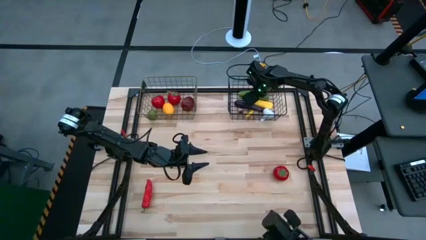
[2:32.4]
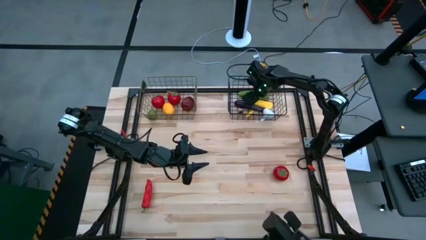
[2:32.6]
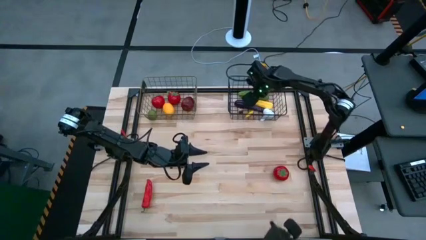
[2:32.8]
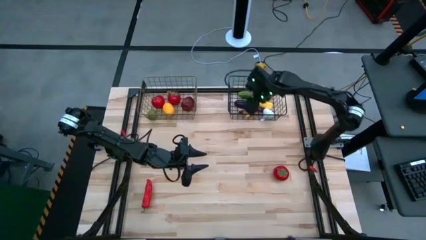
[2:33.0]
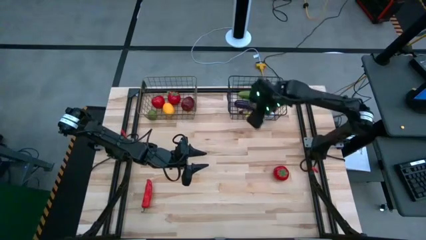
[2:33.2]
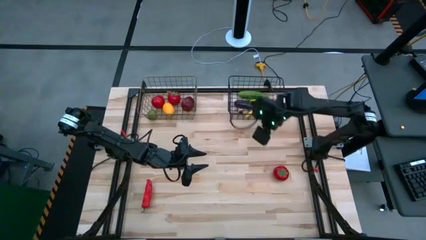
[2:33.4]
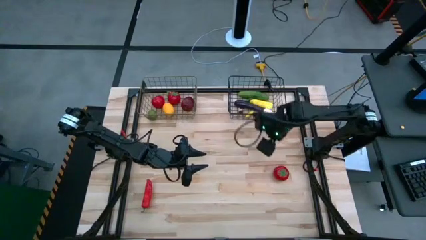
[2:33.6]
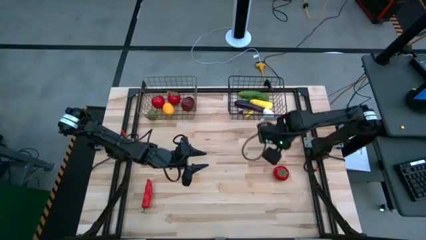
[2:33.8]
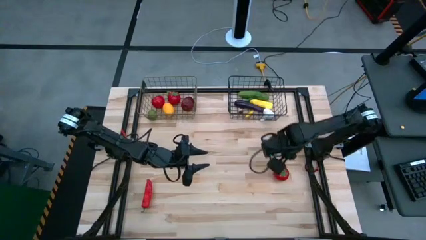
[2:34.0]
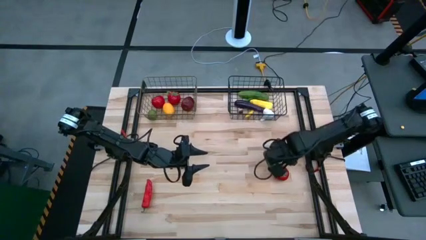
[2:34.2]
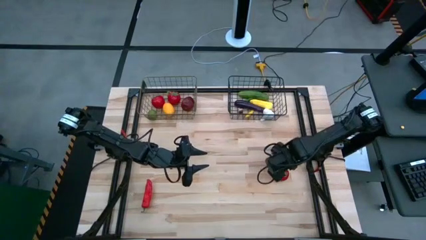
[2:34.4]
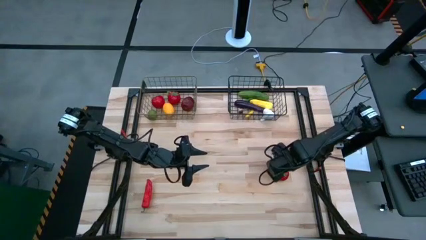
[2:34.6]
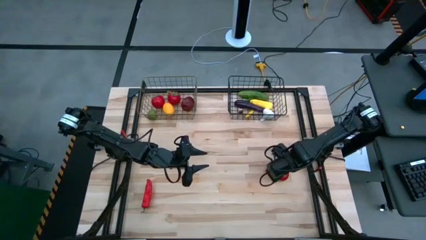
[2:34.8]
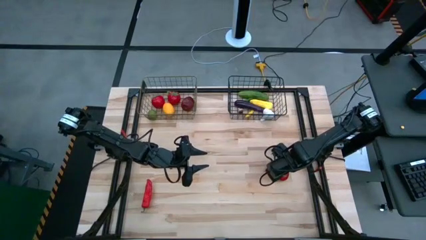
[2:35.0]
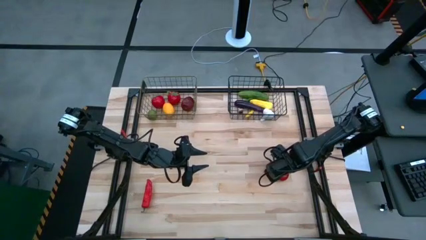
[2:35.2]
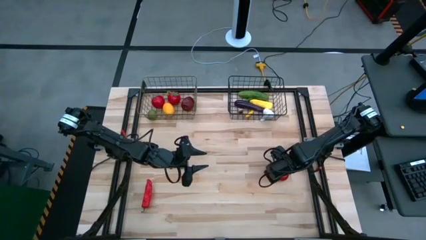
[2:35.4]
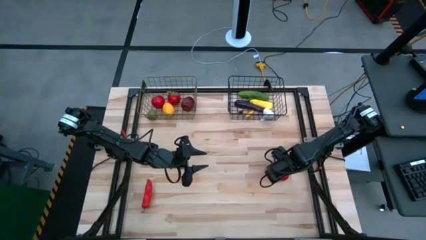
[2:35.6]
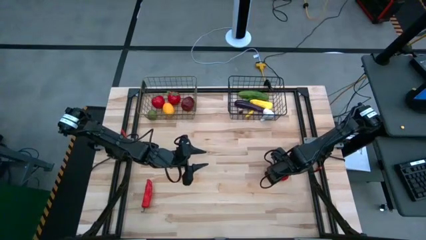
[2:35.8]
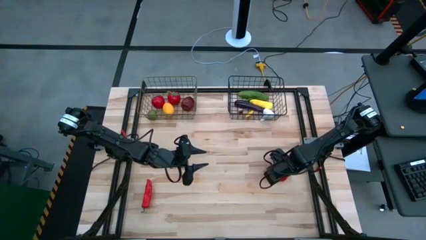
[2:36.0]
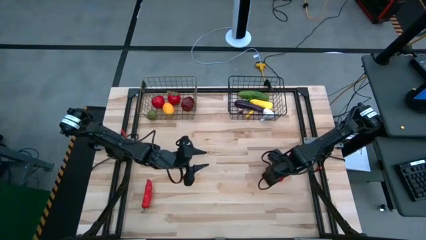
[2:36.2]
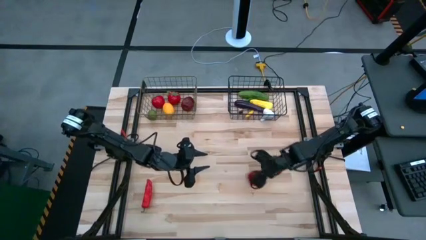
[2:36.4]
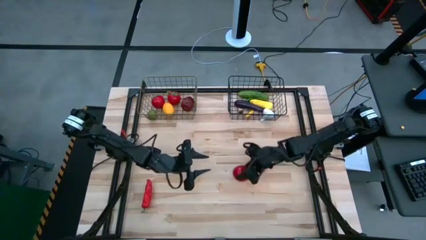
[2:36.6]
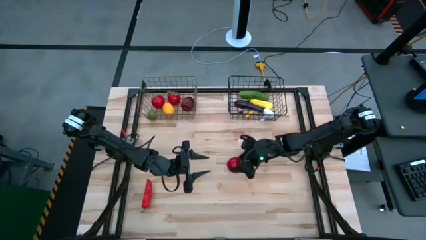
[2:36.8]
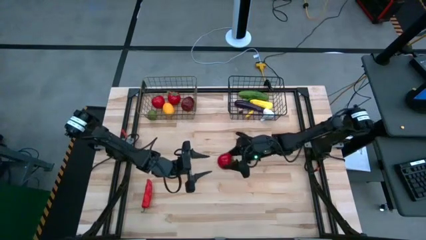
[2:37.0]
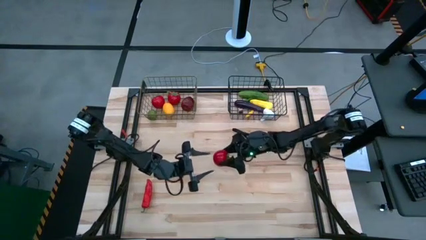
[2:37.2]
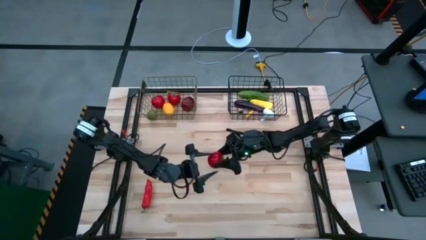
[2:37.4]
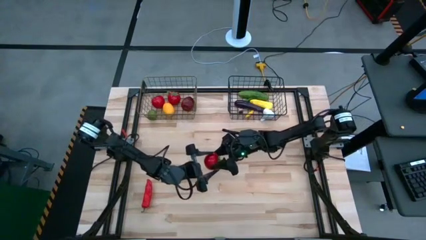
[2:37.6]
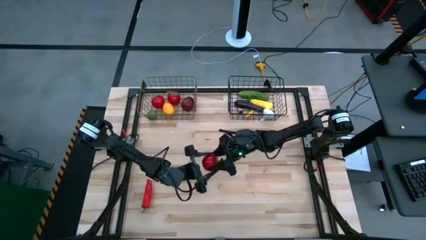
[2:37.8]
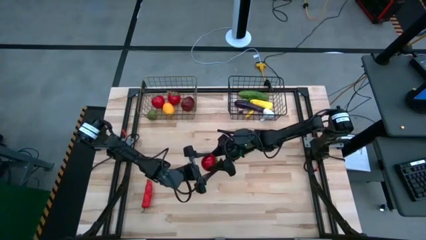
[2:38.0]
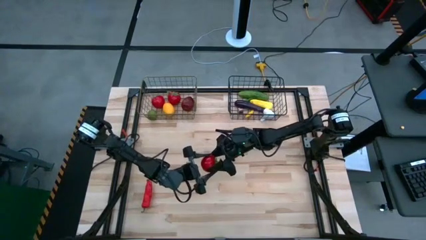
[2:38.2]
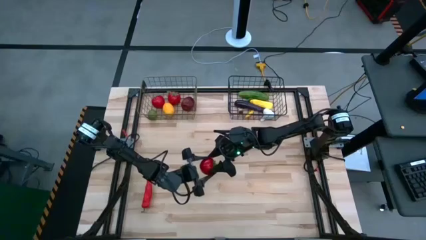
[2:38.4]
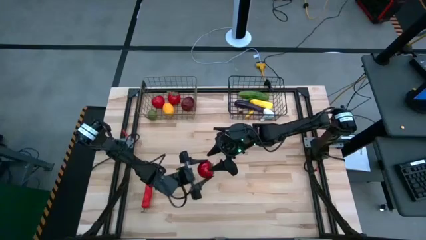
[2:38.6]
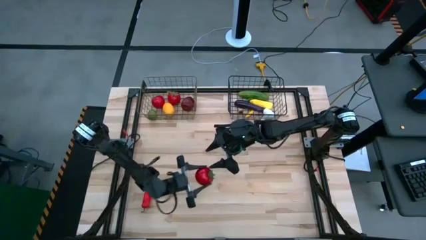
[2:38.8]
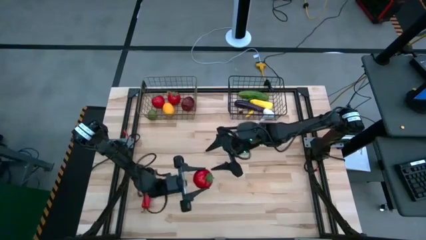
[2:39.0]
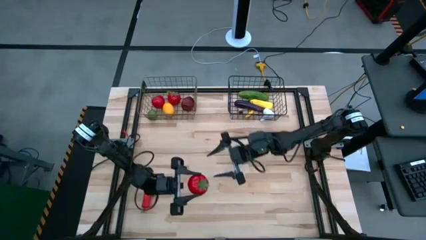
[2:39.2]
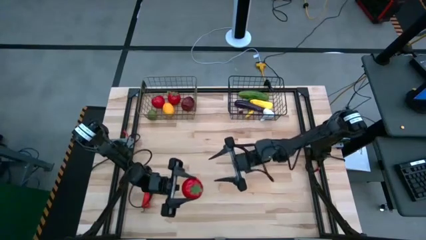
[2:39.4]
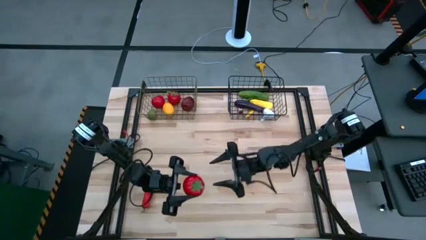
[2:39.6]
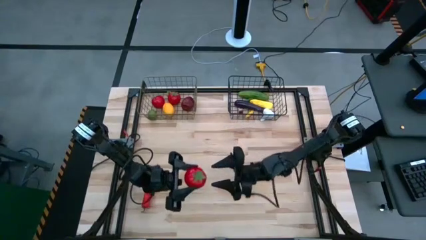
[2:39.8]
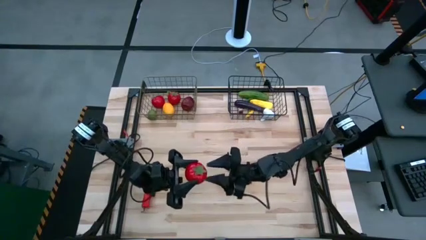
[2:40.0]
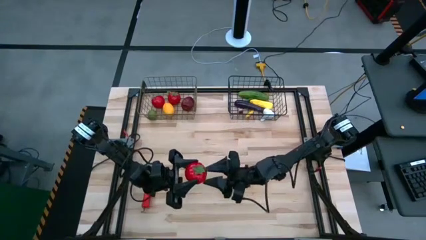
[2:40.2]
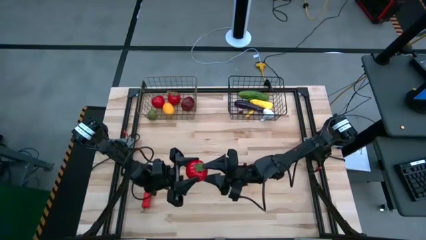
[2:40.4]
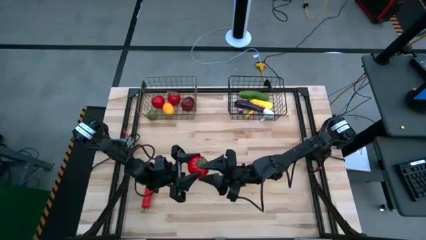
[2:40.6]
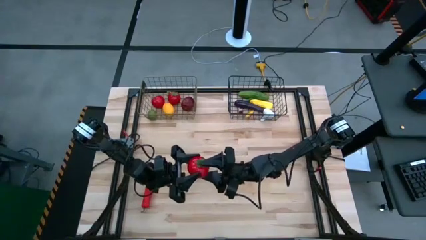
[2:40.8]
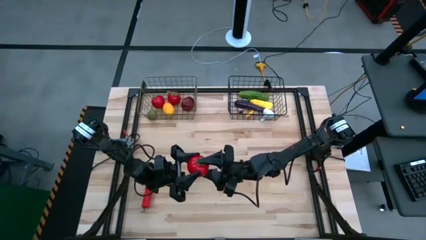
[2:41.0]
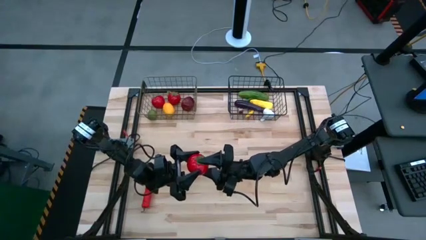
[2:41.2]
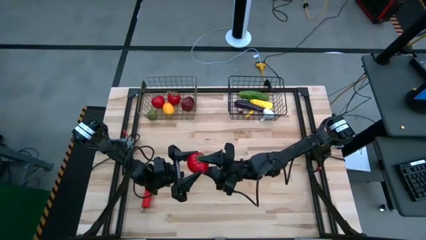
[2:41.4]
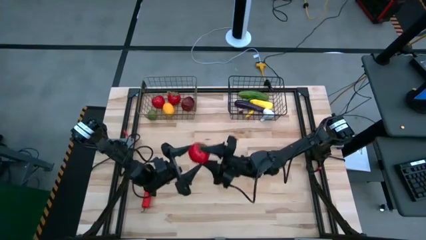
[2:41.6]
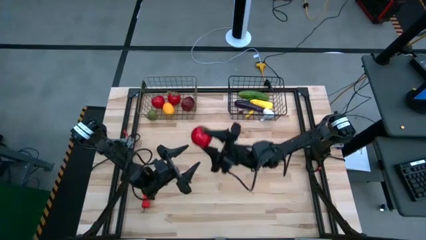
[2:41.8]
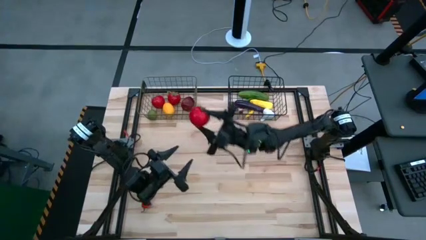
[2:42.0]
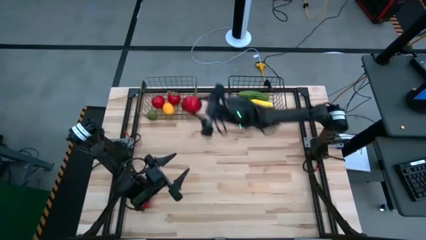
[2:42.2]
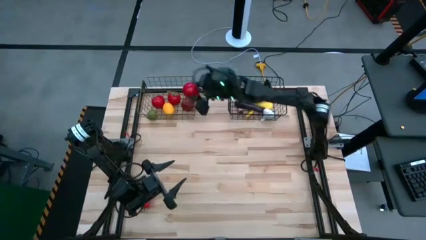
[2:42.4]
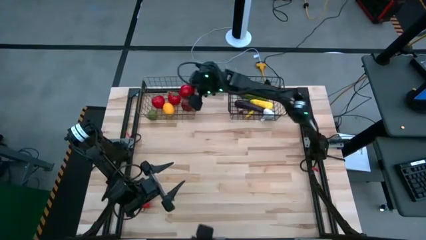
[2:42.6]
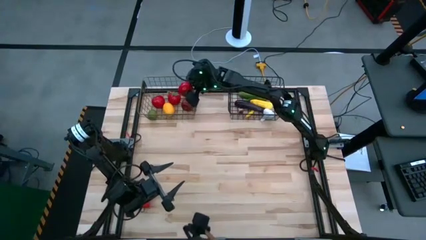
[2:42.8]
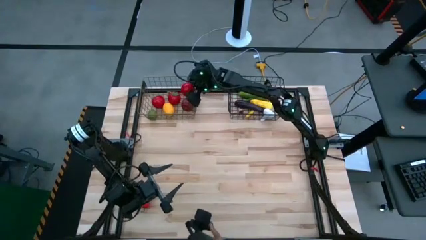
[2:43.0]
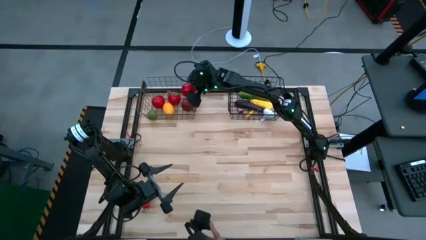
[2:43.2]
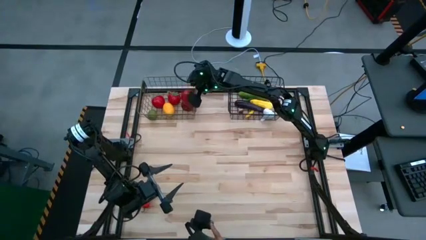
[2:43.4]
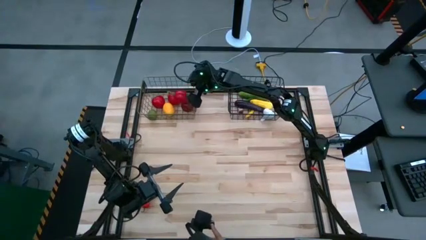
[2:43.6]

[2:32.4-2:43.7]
Task: Sort produce into baskets
Put the tomato into the left wire basket

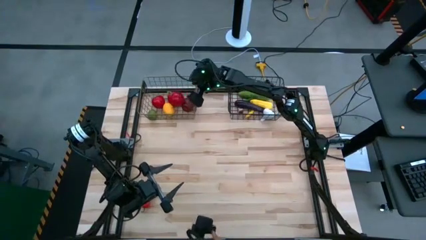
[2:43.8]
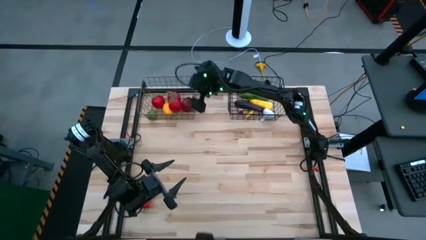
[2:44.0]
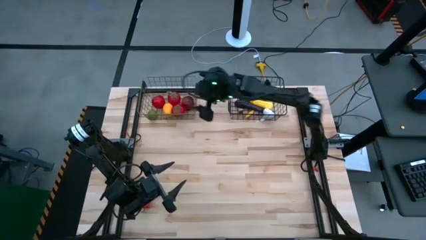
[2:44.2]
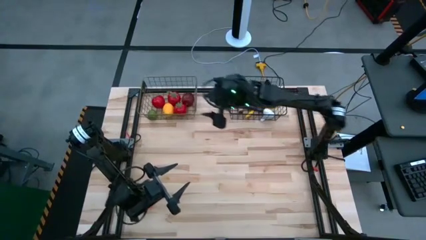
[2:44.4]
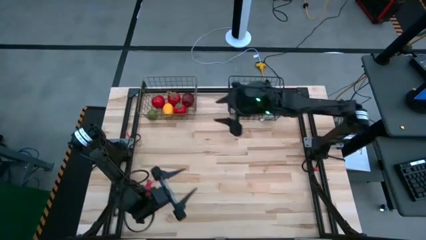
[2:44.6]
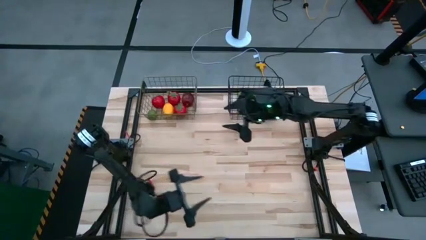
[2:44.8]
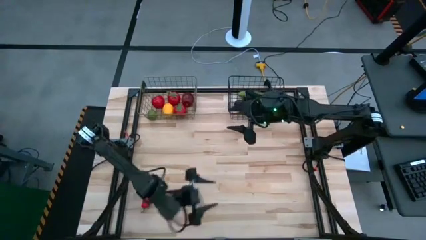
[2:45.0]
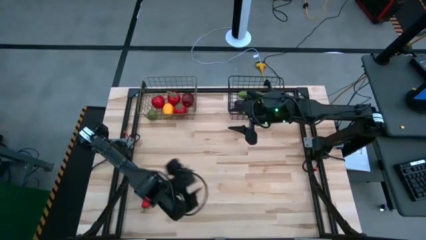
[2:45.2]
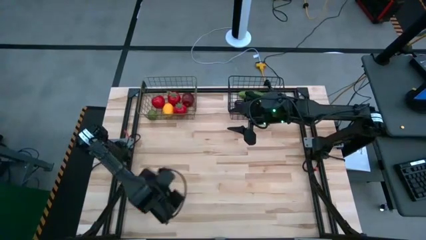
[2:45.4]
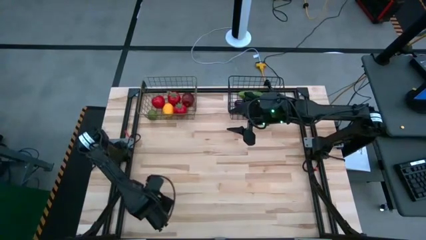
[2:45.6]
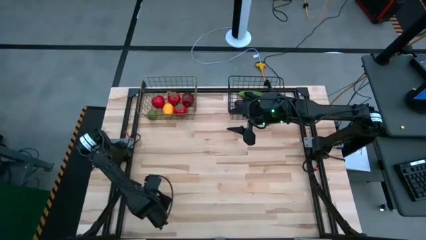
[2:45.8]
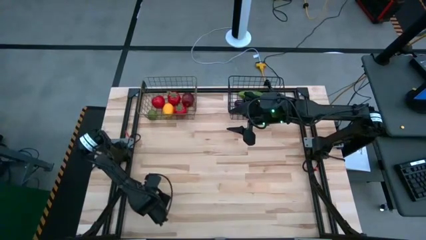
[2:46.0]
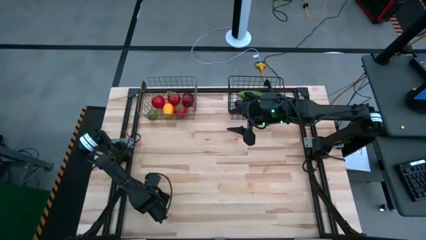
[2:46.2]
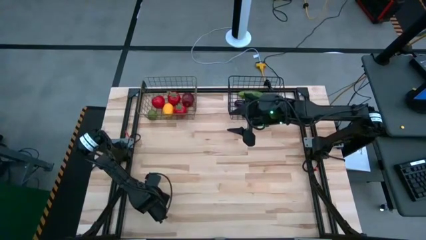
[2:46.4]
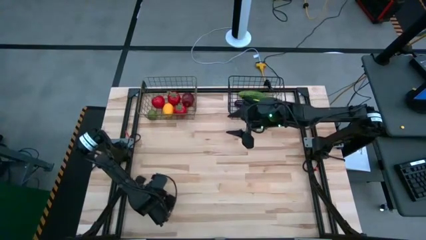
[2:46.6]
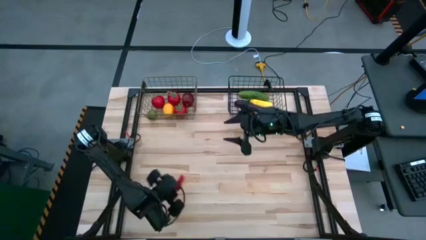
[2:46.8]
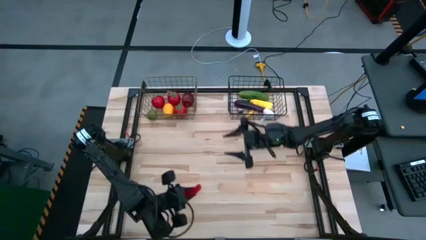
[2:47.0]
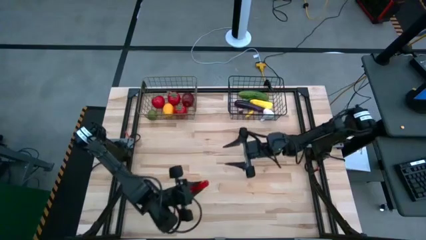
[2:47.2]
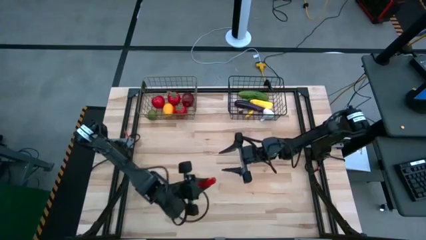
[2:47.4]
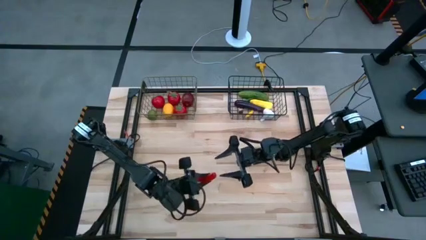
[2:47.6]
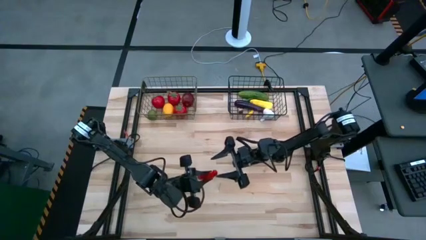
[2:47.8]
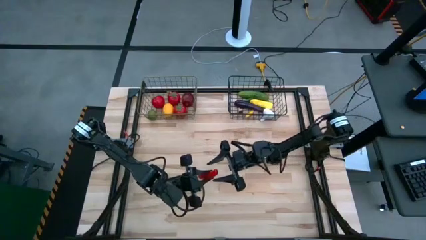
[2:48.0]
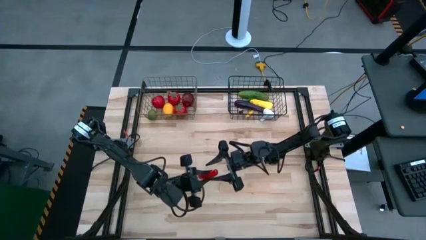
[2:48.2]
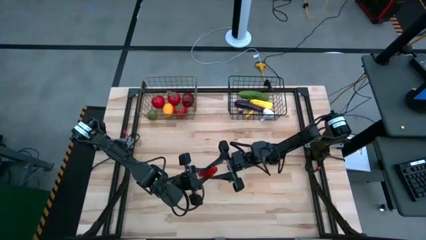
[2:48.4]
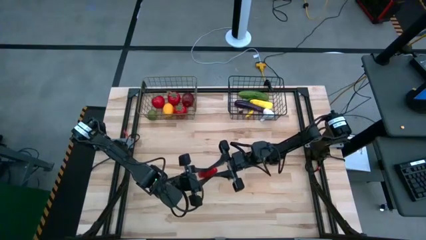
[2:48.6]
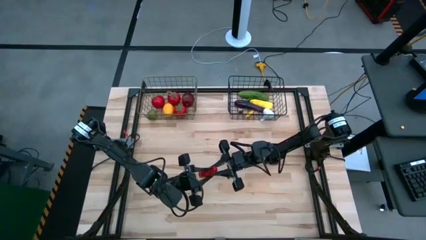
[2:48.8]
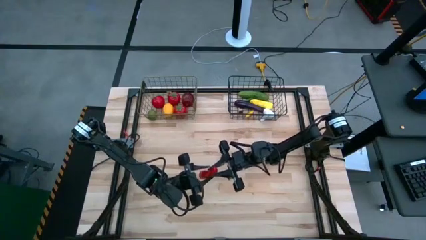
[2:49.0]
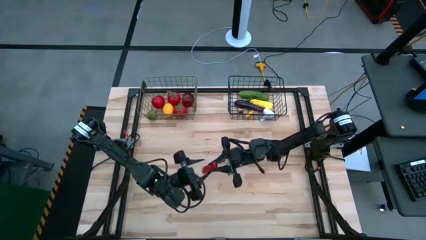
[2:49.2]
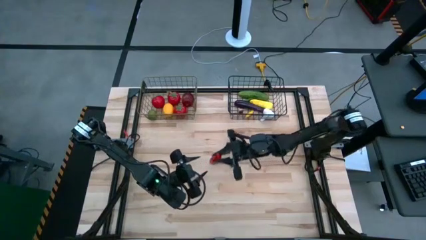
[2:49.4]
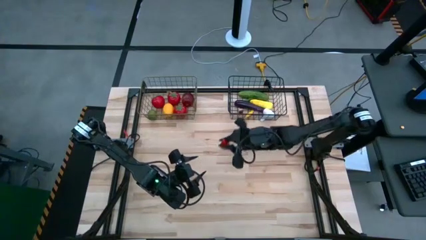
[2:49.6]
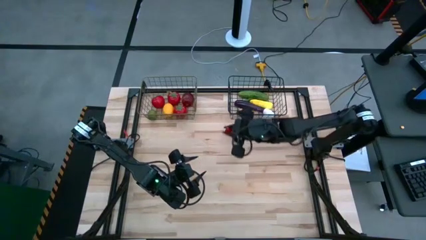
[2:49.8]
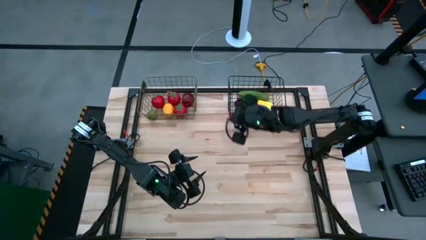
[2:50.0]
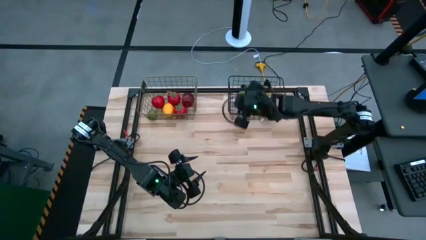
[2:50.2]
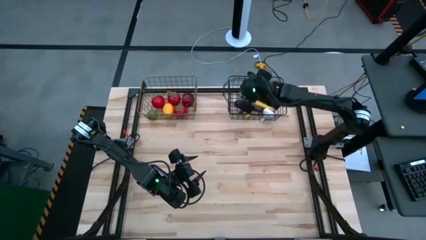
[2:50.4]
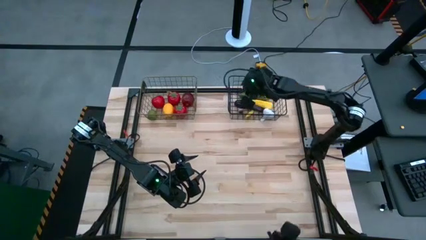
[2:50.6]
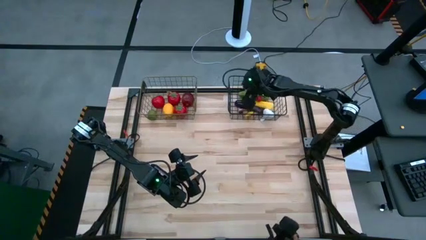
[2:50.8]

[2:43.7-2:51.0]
Put the red chili into the right wire basket
